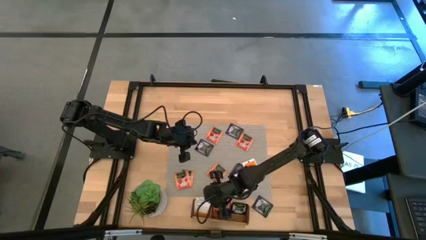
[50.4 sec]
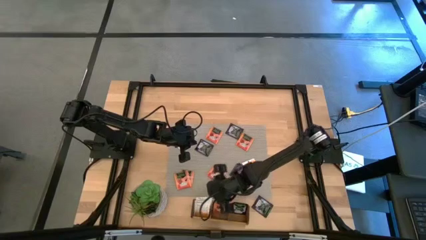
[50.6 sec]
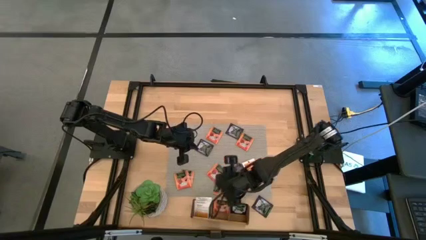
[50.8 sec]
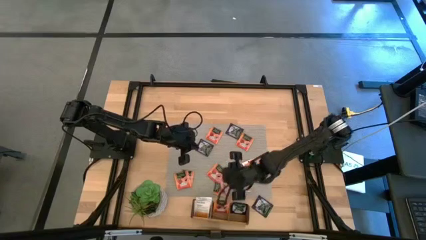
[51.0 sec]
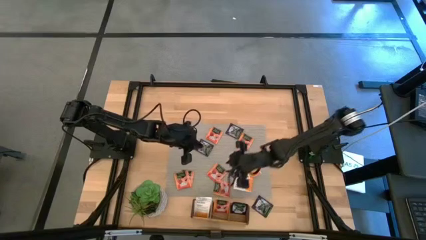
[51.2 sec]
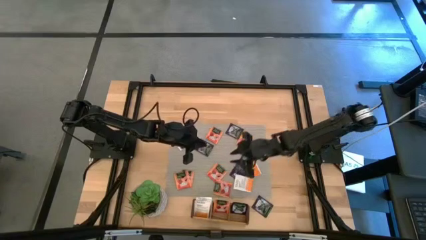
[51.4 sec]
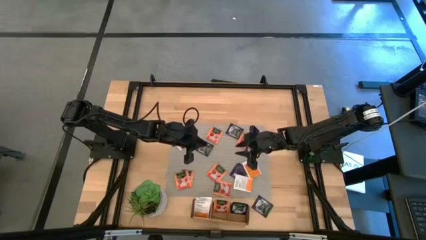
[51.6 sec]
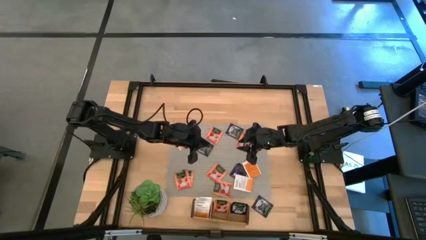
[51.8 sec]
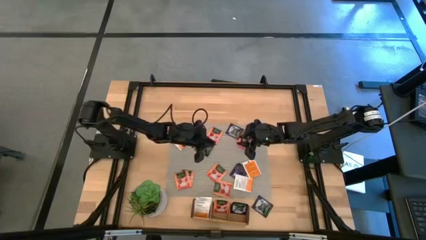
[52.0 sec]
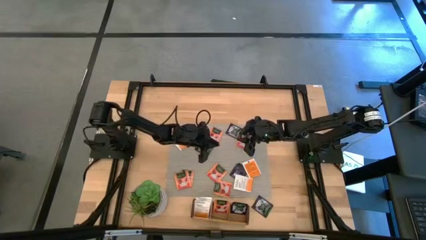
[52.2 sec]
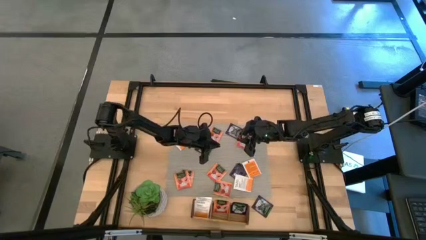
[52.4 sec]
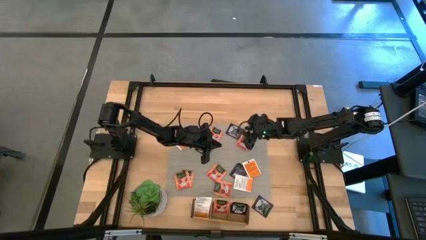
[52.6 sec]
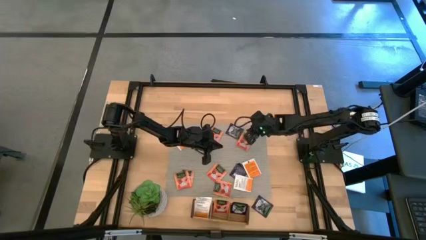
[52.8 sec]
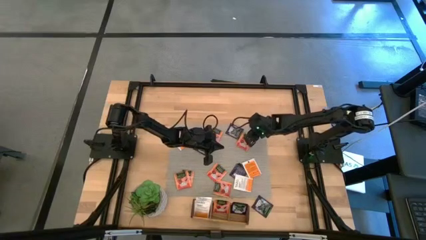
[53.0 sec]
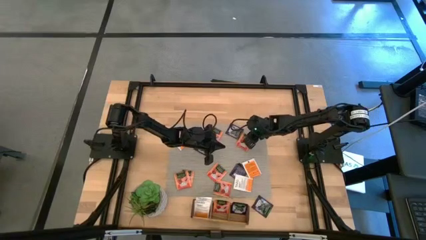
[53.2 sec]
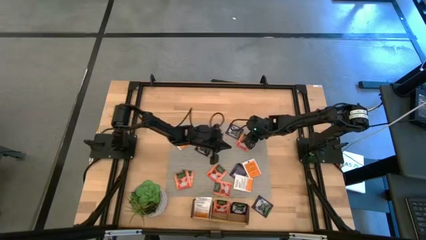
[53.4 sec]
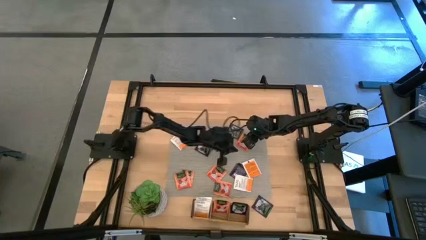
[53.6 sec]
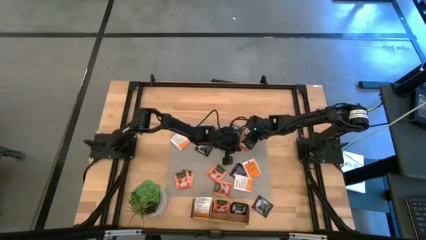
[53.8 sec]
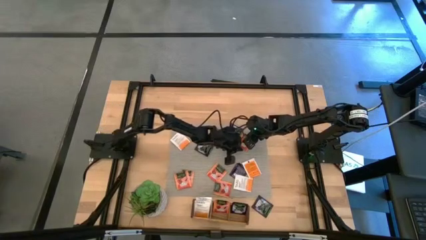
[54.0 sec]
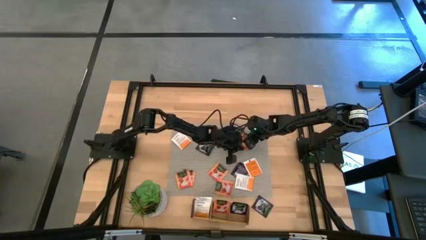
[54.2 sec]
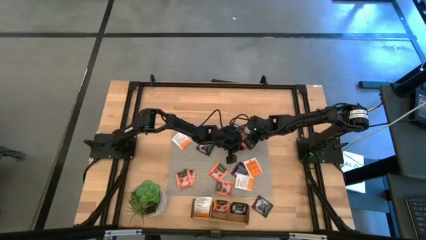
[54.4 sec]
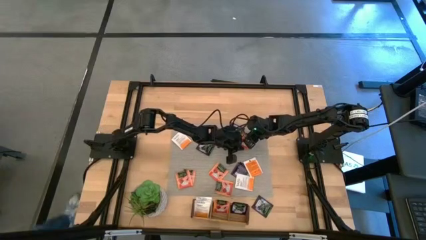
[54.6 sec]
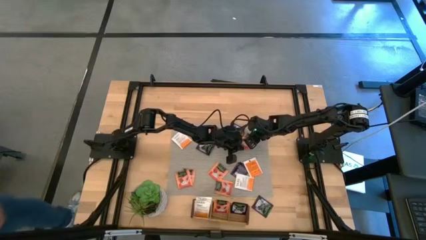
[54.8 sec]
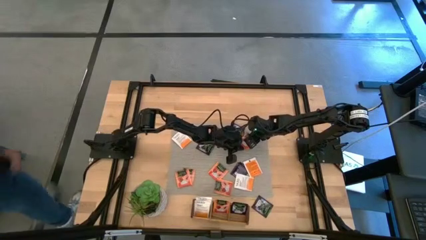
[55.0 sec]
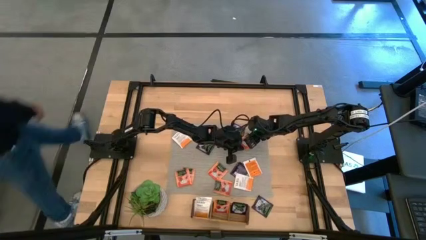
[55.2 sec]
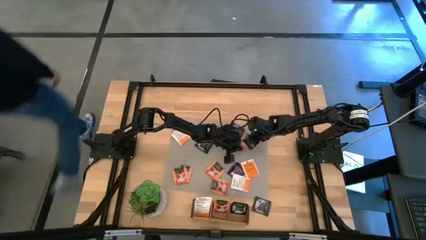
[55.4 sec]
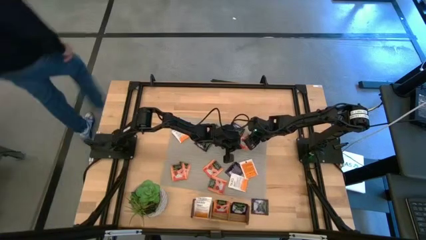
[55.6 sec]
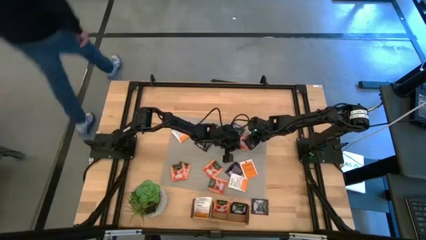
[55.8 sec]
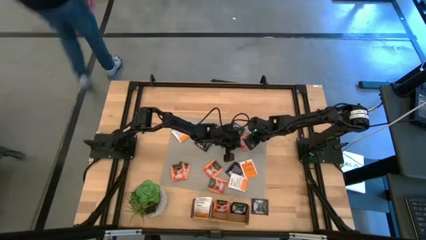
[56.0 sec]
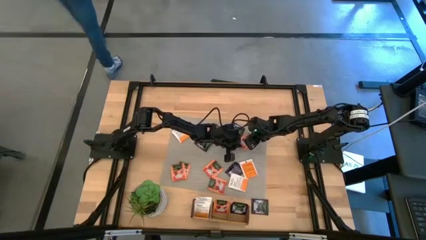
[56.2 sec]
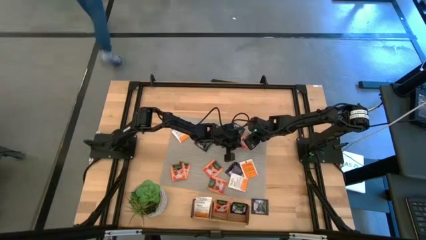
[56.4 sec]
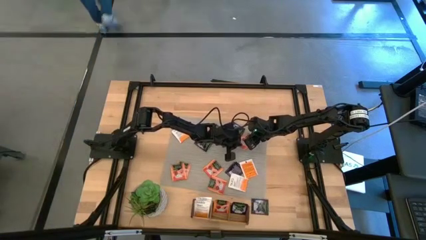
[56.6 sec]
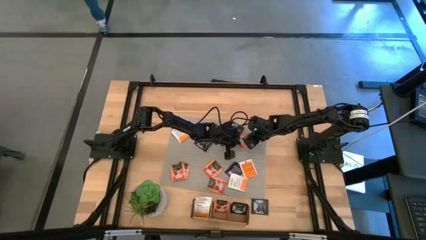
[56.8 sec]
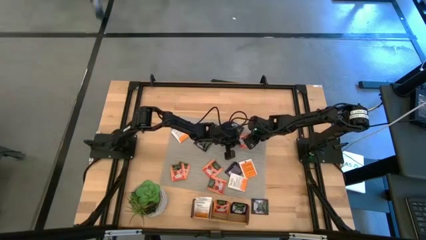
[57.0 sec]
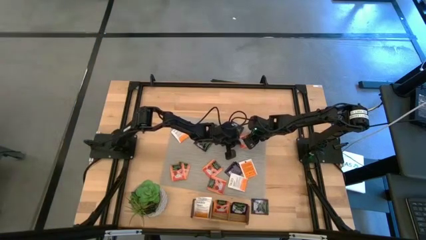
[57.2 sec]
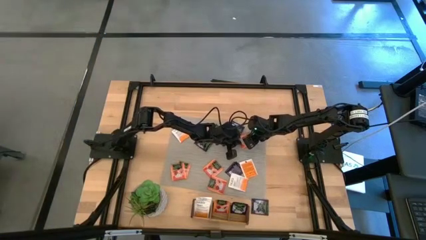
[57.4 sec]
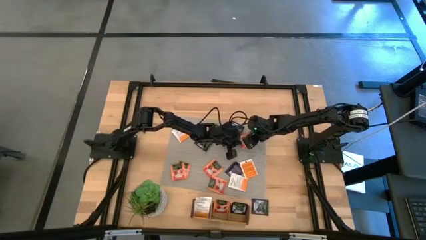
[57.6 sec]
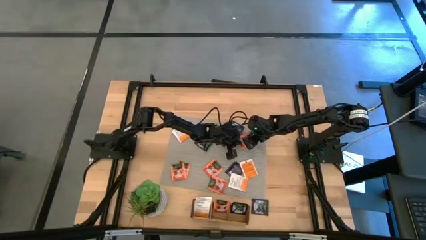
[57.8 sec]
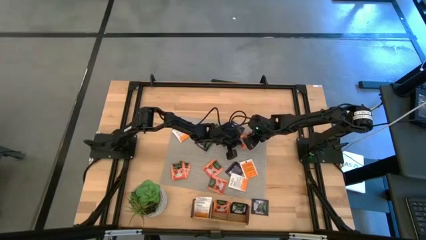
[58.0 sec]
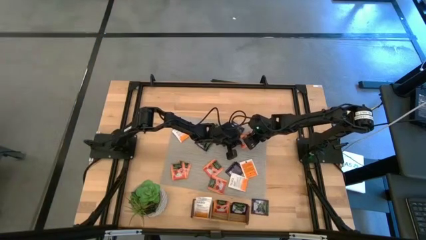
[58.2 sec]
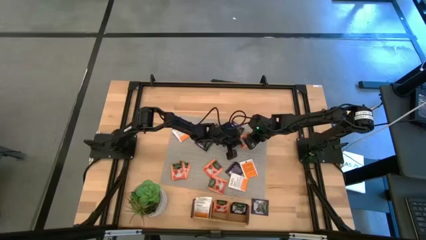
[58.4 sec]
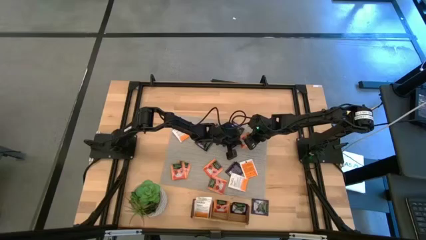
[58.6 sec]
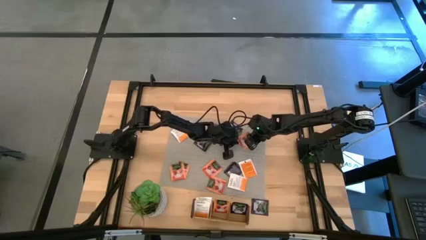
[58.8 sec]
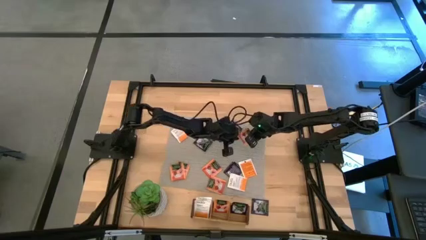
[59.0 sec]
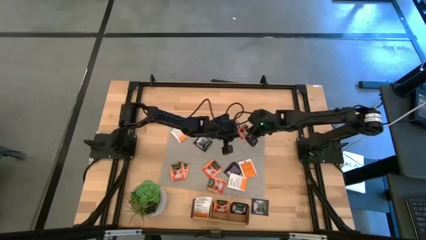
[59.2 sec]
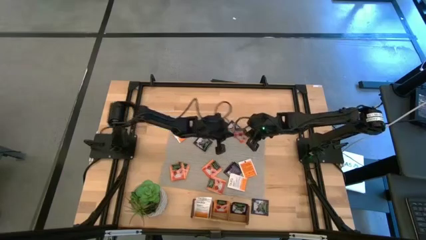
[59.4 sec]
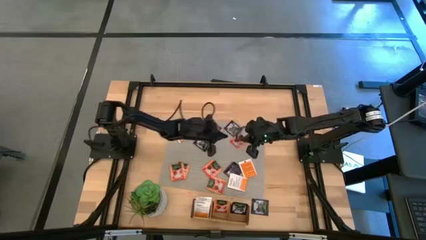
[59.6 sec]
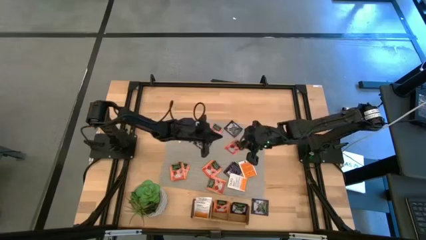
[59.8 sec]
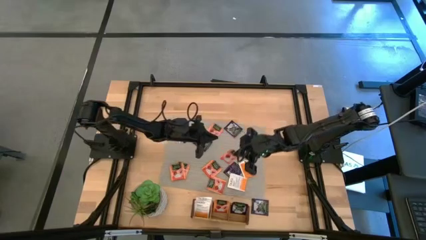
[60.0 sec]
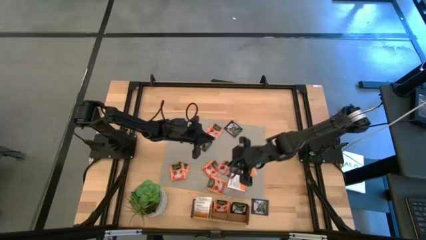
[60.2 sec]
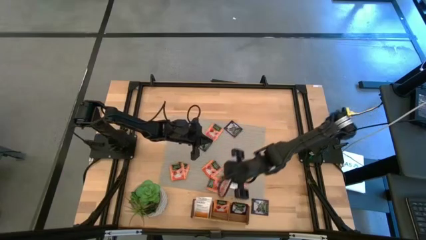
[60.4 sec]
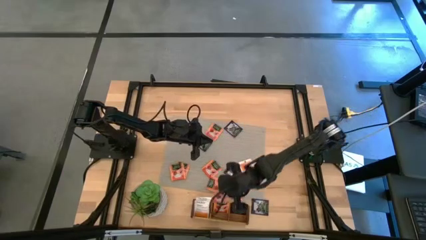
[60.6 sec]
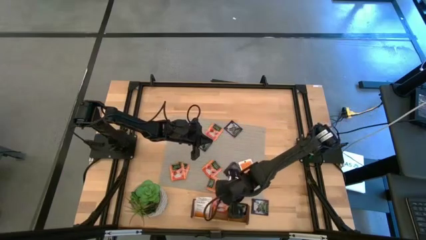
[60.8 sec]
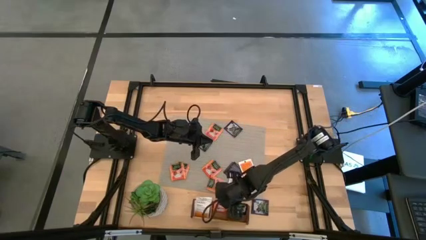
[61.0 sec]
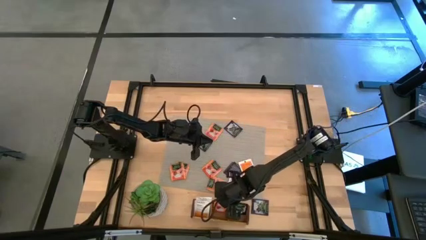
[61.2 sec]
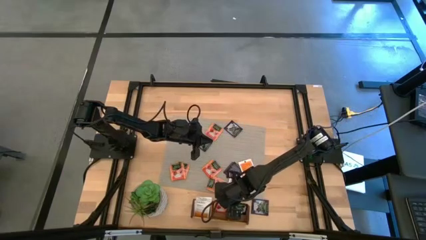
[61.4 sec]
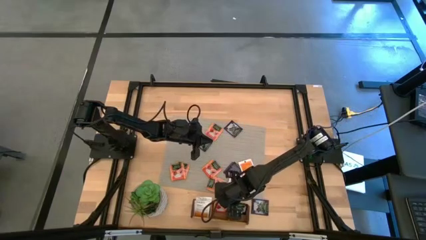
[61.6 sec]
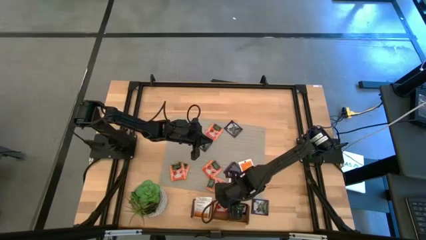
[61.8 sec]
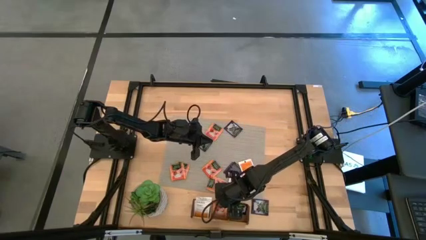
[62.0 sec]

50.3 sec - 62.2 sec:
Task: Pick & Place Tea
Put the orange tea bag into the middle section of the wooden organizer

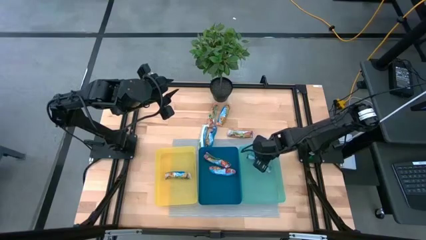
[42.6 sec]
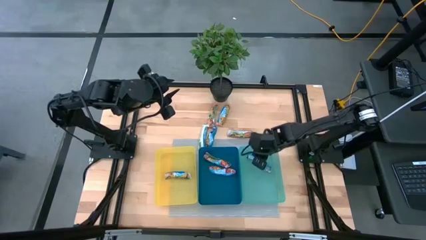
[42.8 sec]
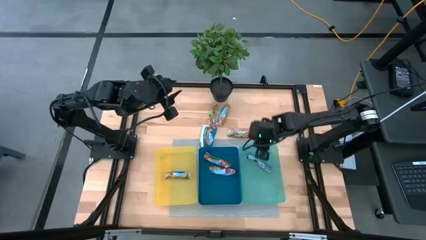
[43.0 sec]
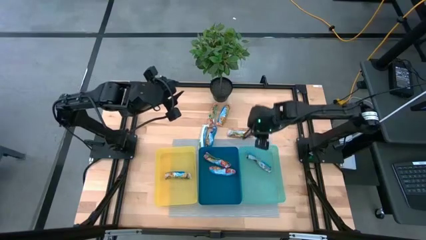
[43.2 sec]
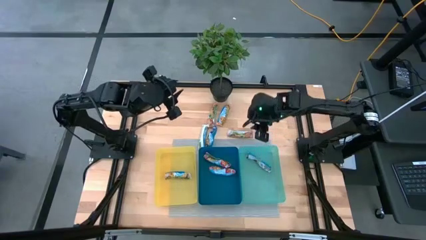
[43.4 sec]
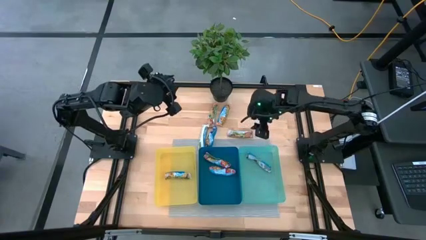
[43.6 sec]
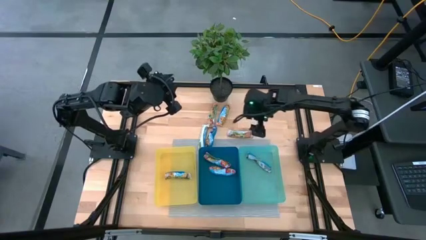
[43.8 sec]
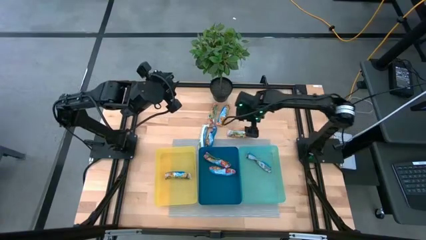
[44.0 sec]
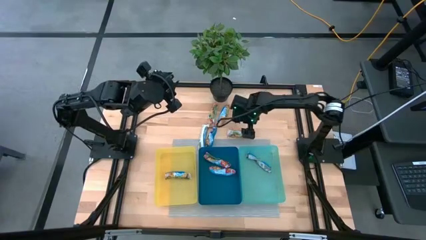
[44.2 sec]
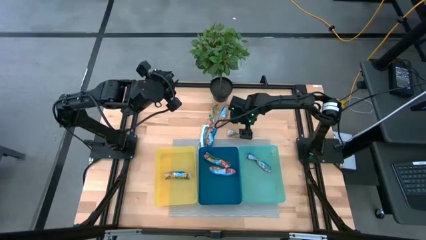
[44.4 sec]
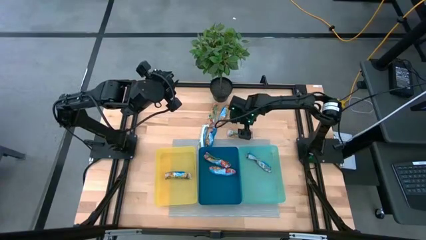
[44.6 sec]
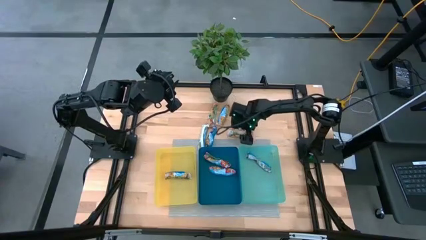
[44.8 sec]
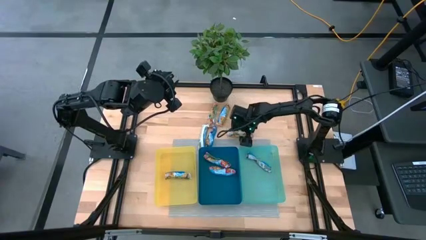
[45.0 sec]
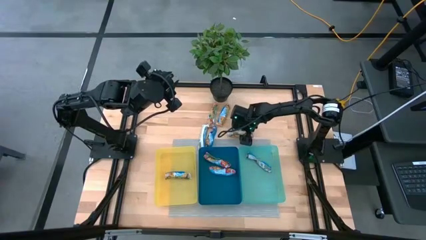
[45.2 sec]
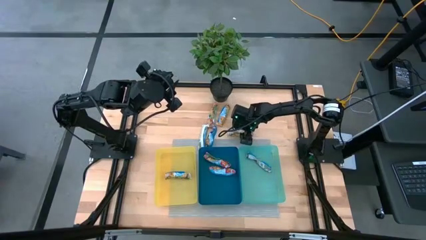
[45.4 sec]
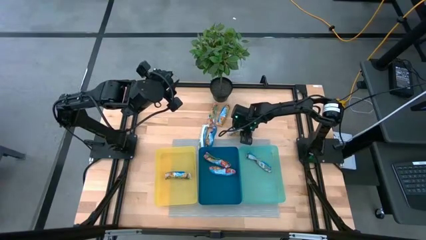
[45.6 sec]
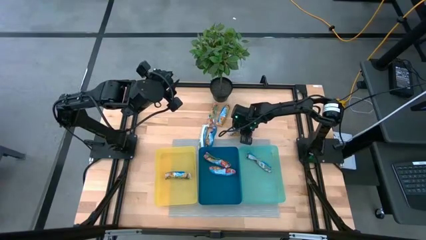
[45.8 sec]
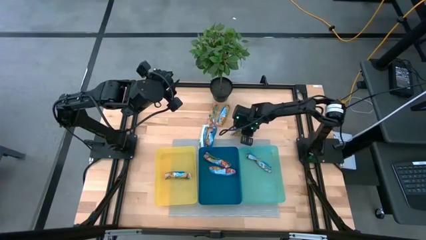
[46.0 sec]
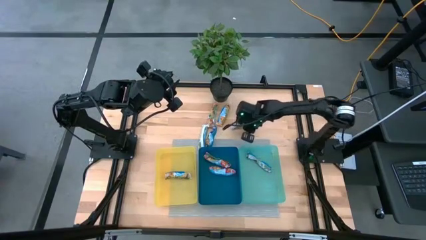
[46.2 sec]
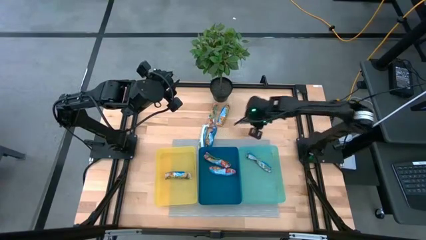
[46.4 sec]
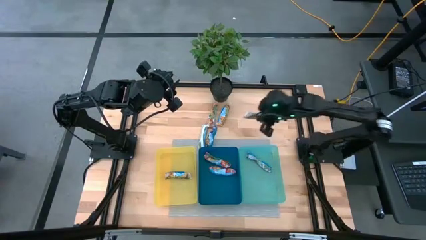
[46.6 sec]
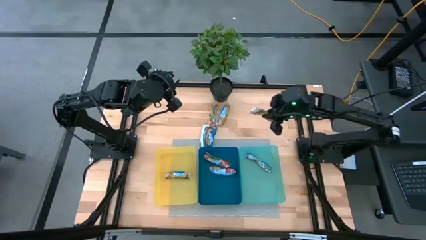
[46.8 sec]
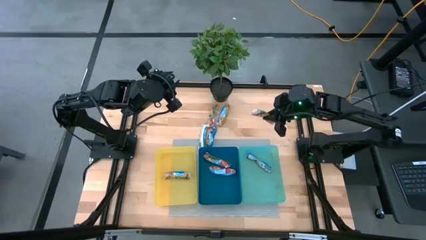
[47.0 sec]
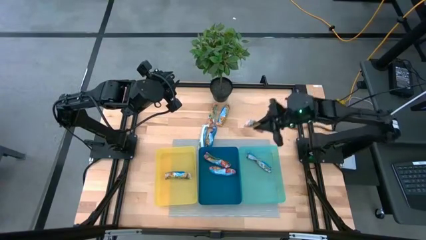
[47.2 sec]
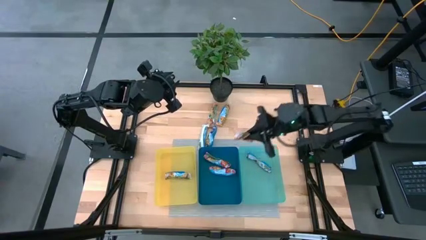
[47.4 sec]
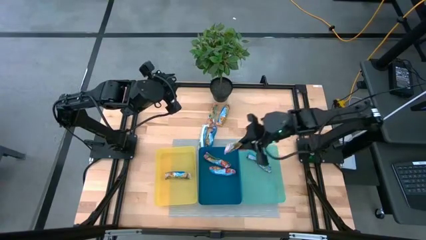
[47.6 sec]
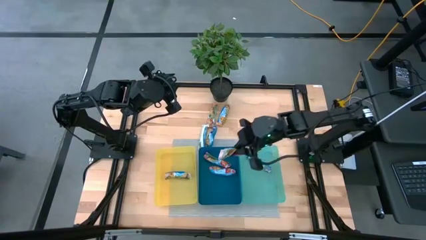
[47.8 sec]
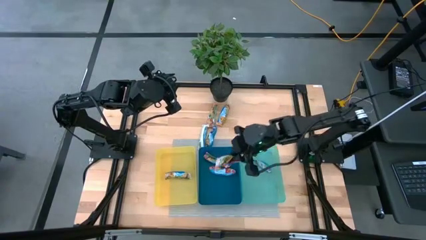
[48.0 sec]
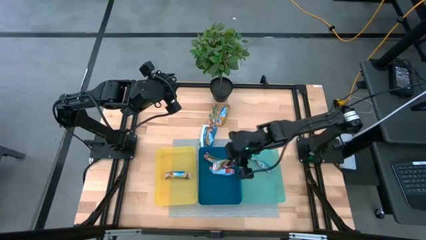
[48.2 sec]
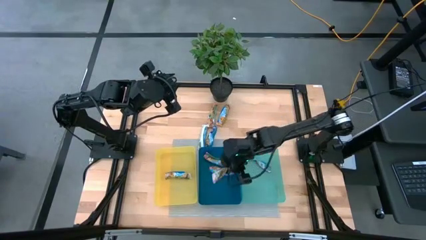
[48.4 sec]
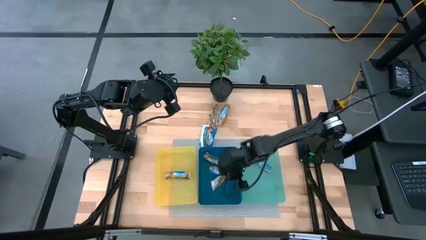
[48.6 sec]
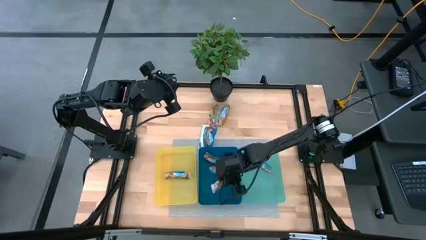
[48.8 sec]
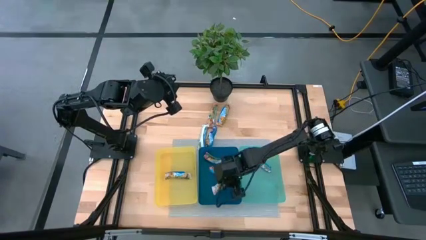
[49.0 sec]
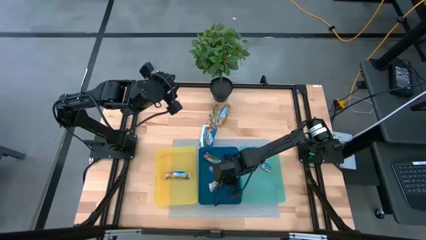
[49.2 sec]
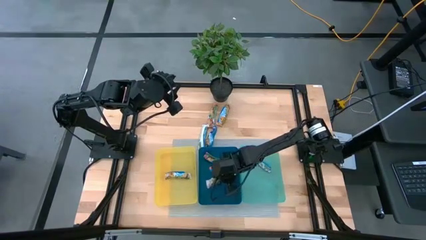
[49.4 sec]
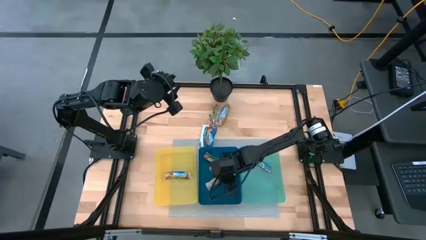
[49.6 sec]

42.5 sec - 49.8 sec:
Task: Pick and place Granola Bars by type
Put the red granola bar into the blue bin
